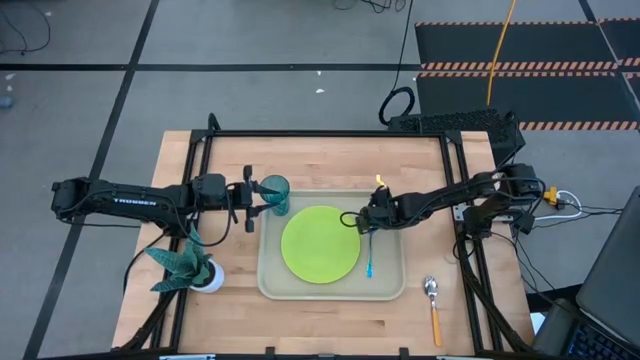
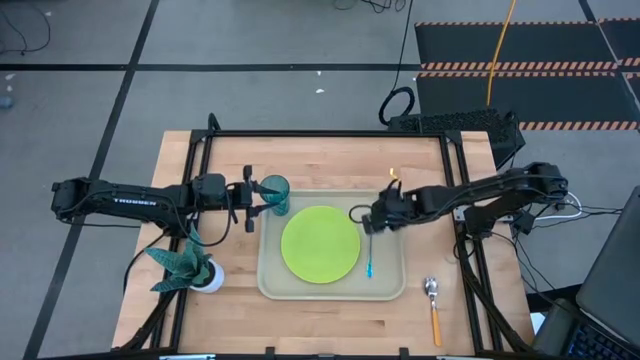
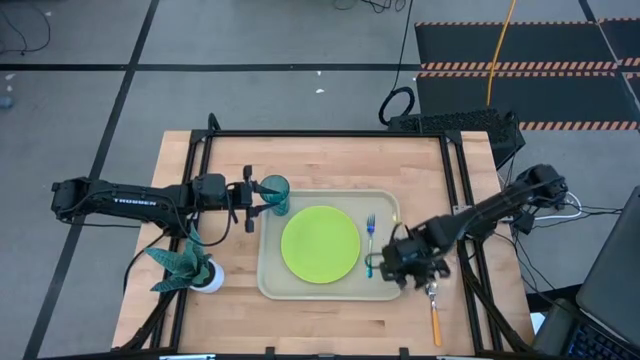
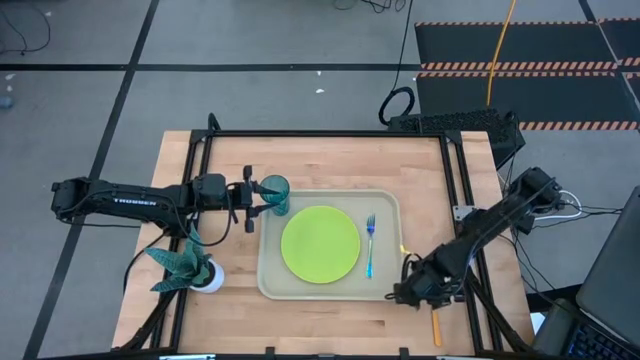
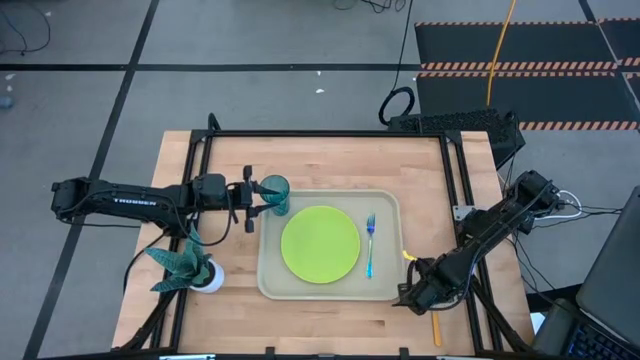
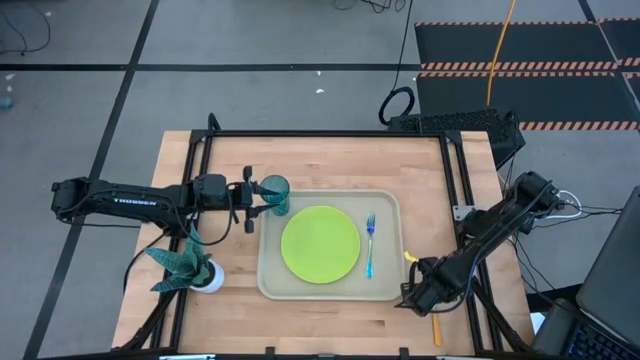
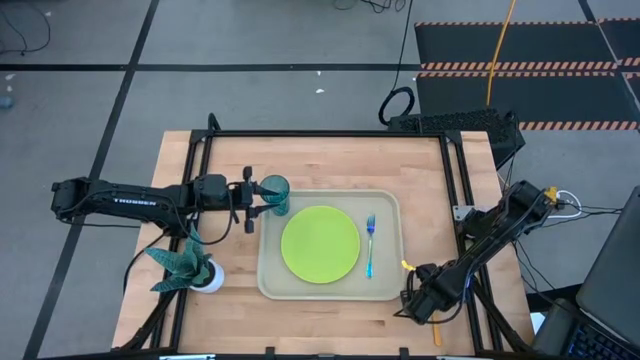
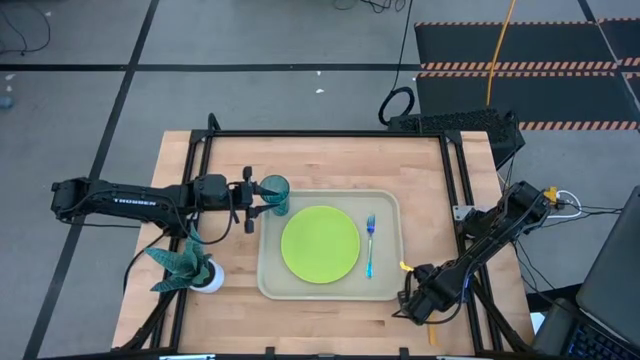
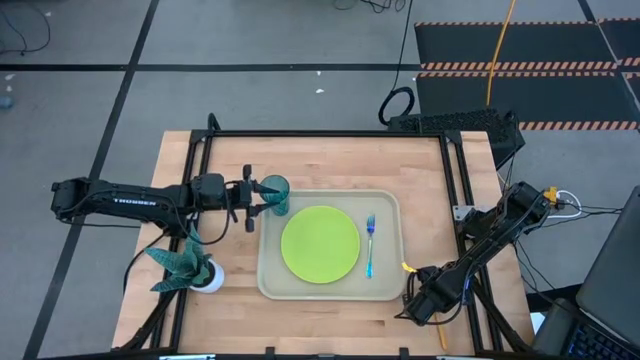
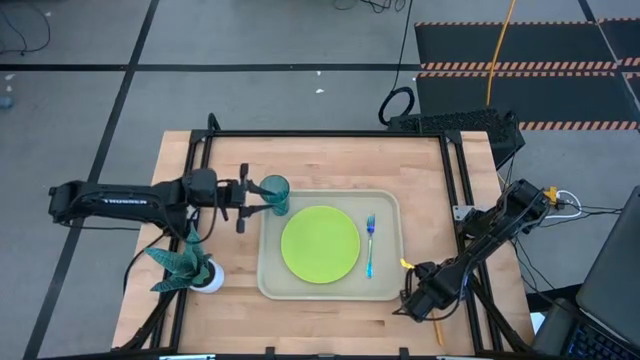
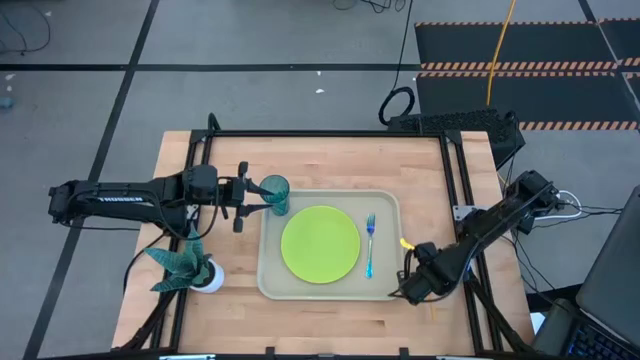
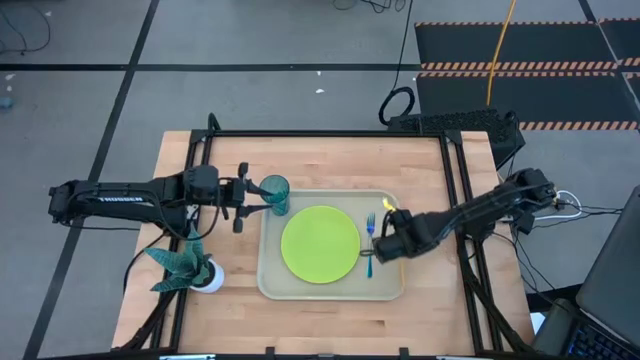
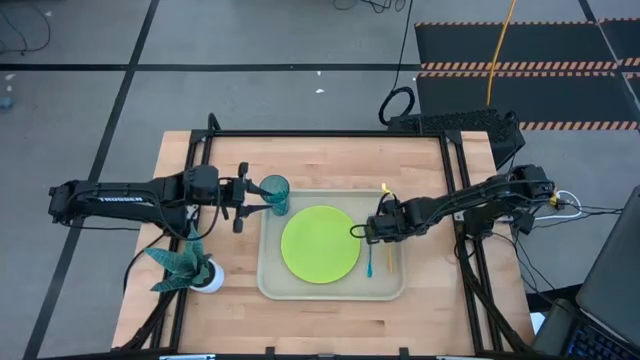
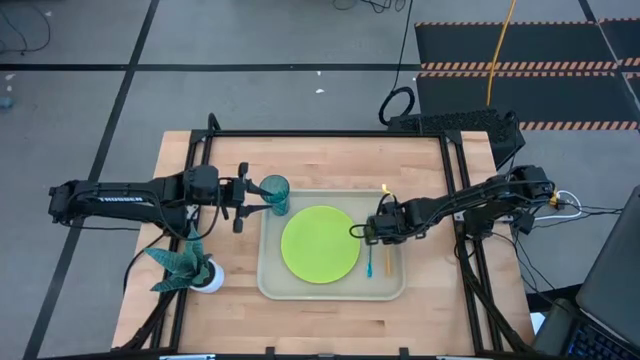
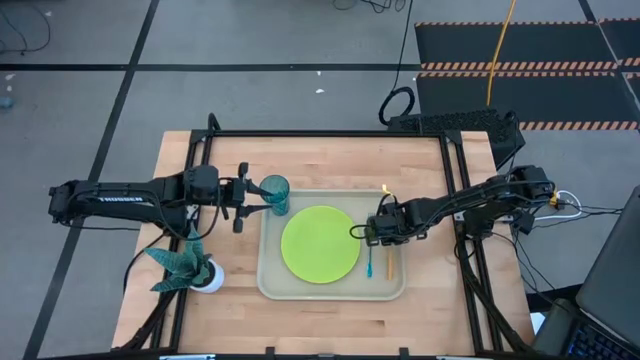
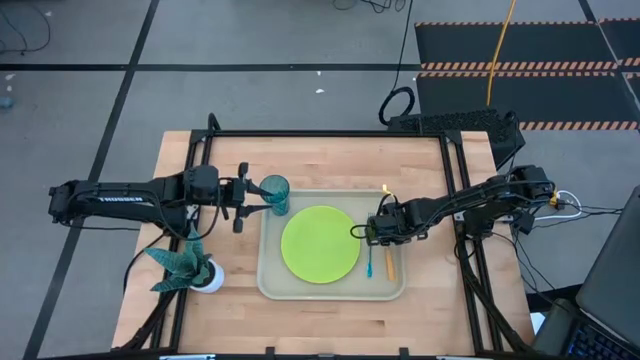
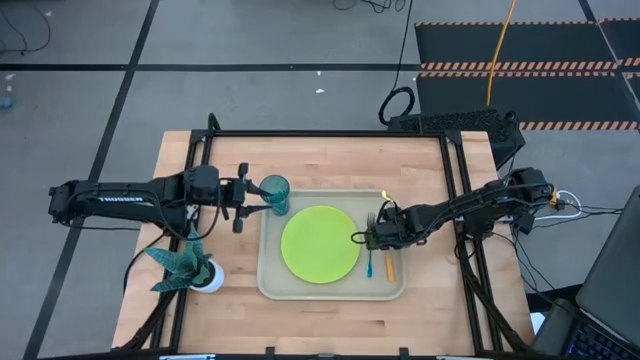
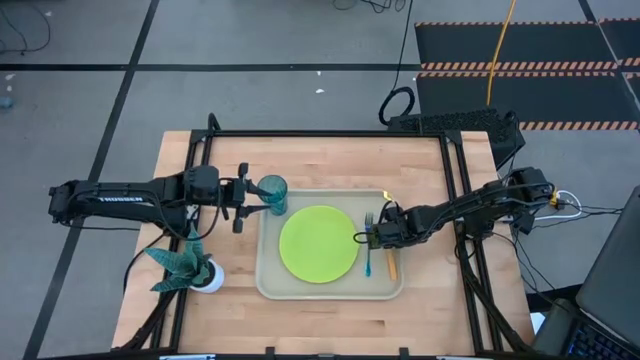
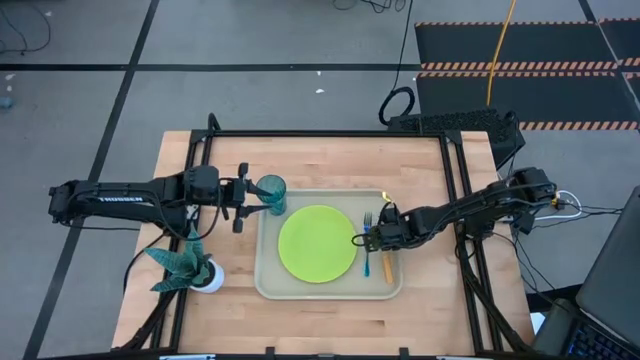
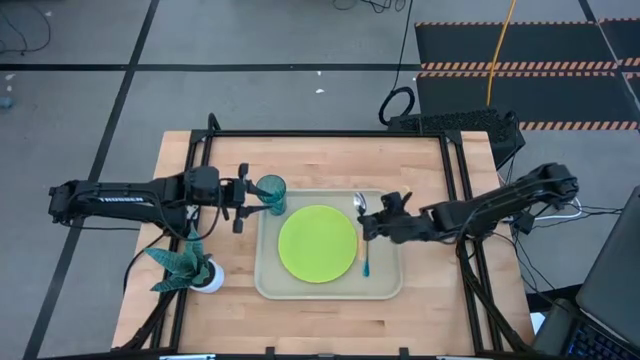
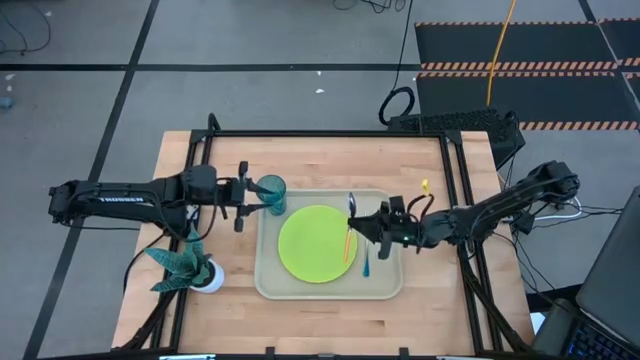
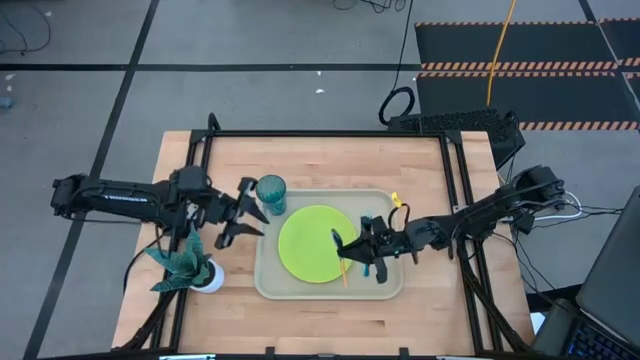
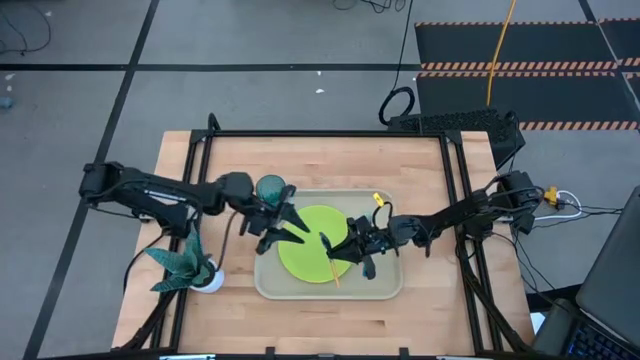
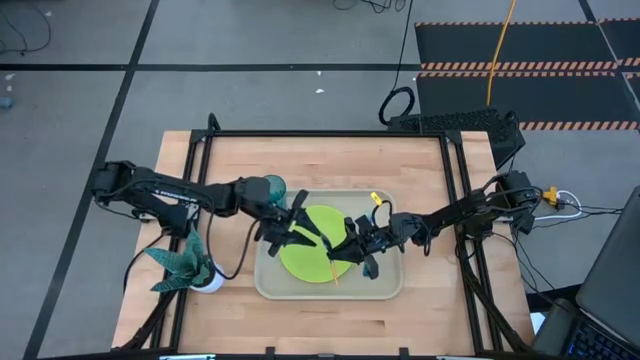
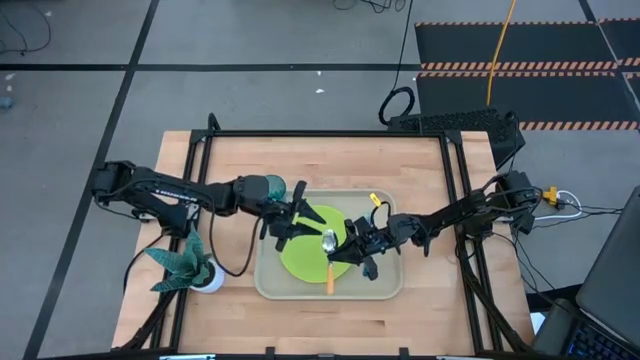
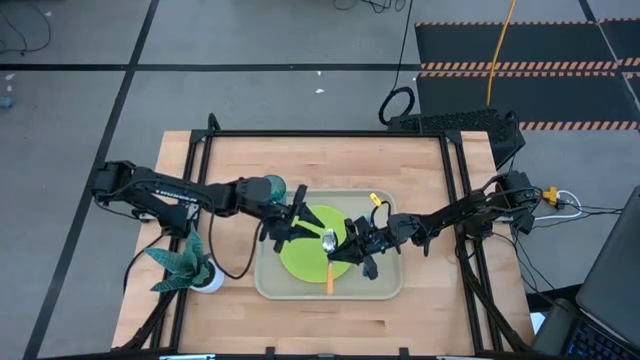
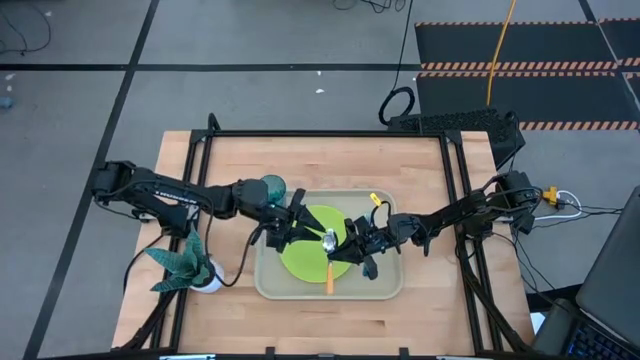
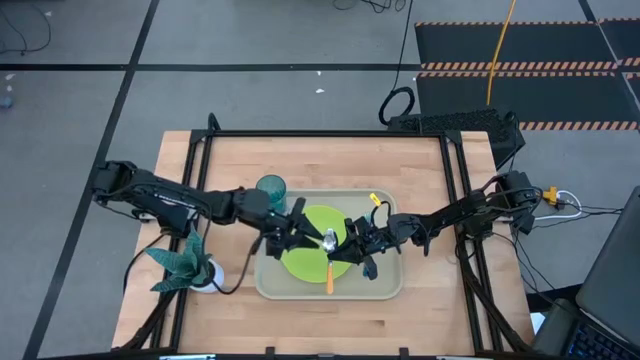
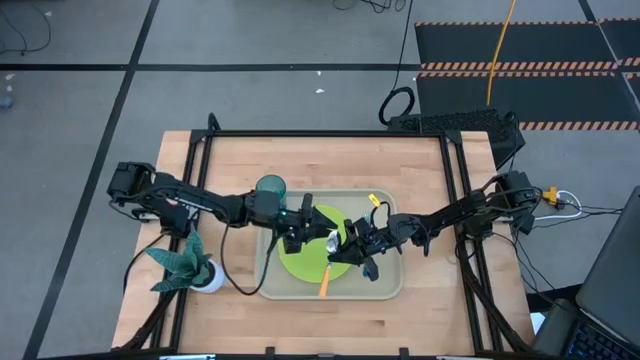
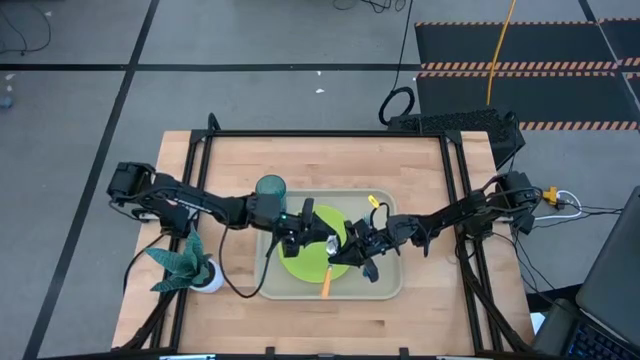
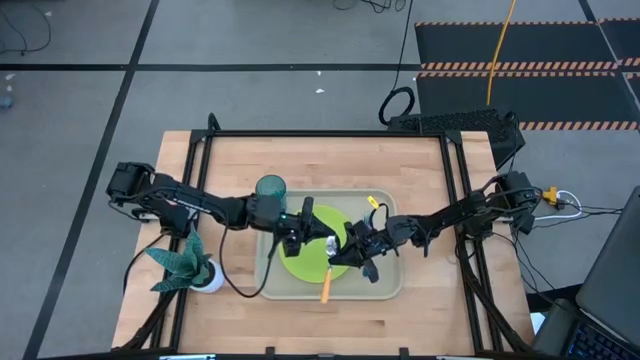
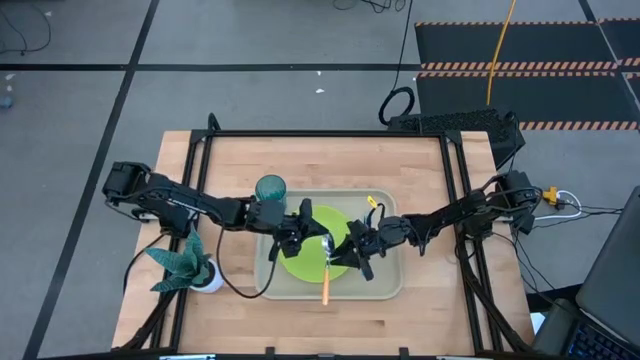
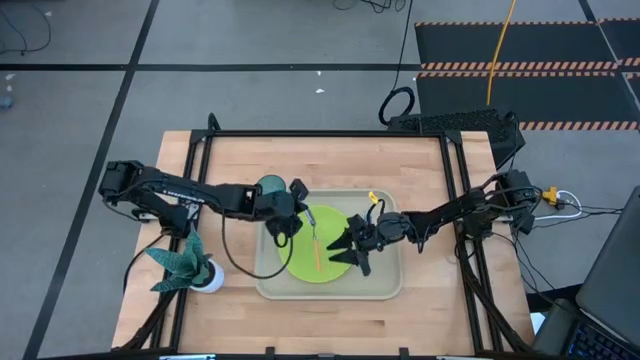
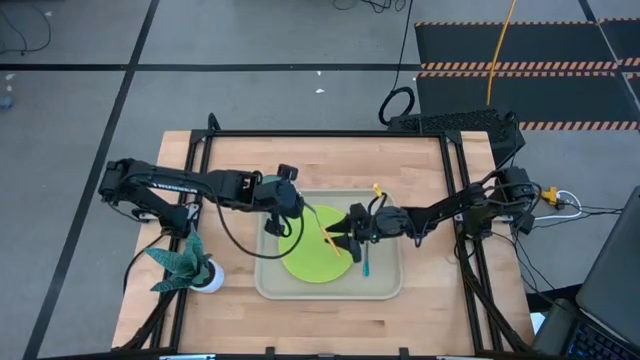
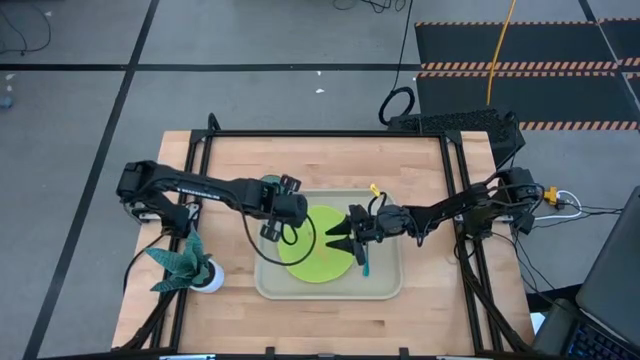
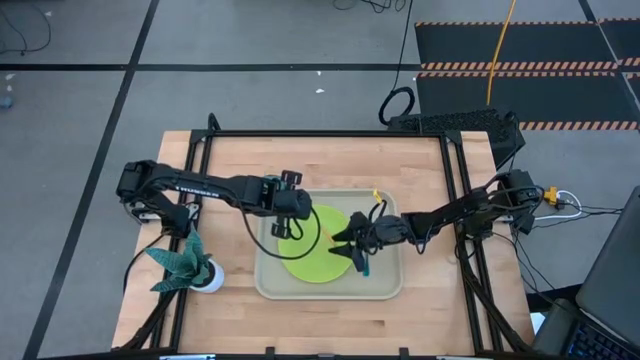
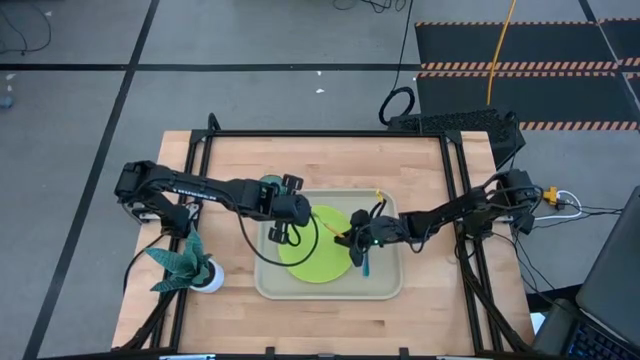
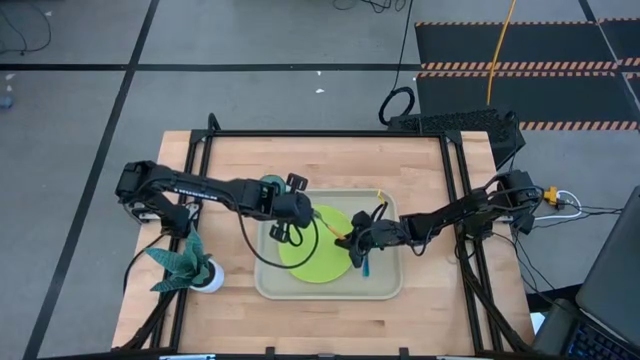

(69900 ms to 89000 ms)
Task: Pick and place plate/cup/fork/spoon on tray
Put the yellow spoon on the gray serving tray

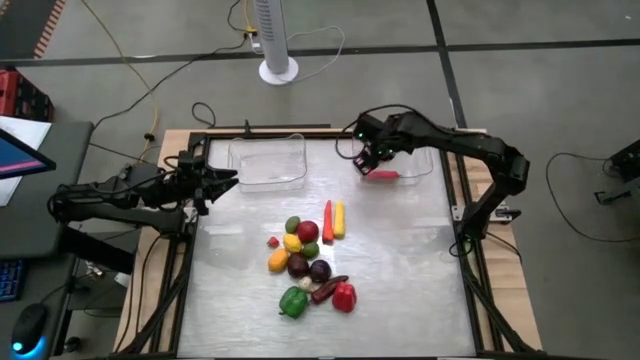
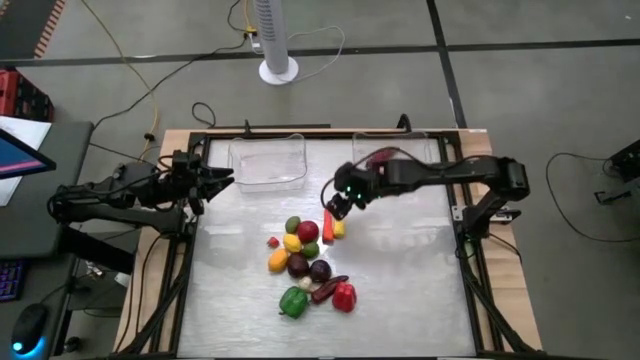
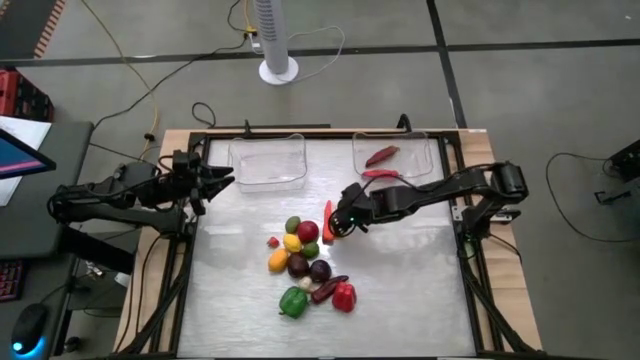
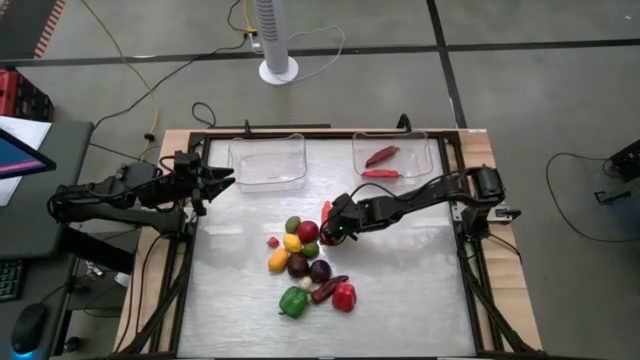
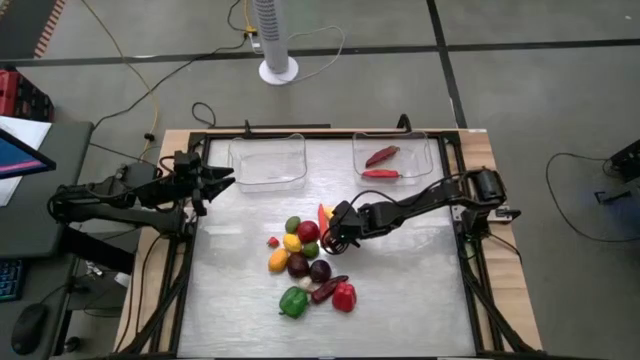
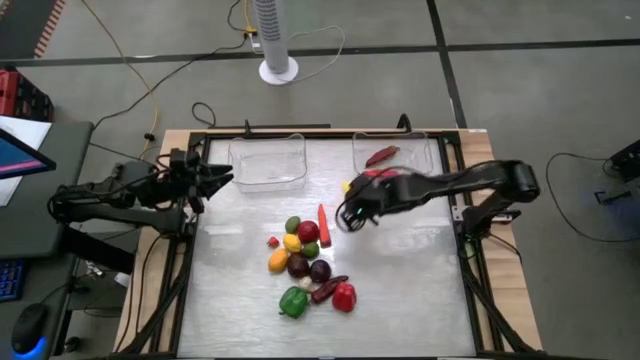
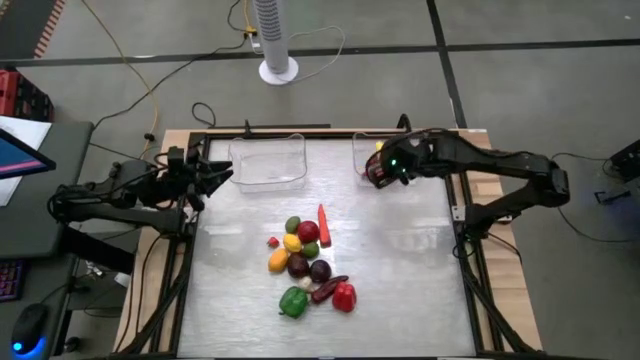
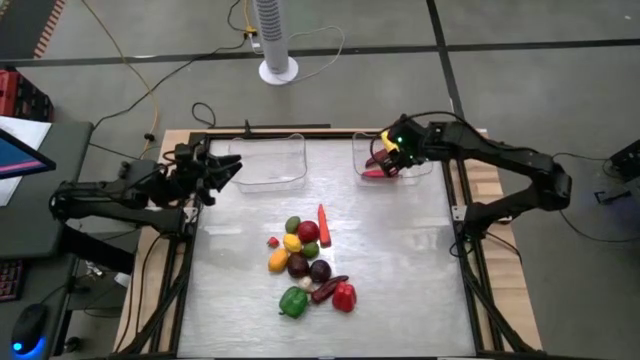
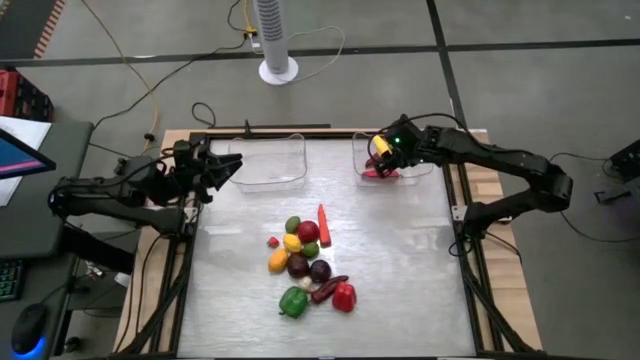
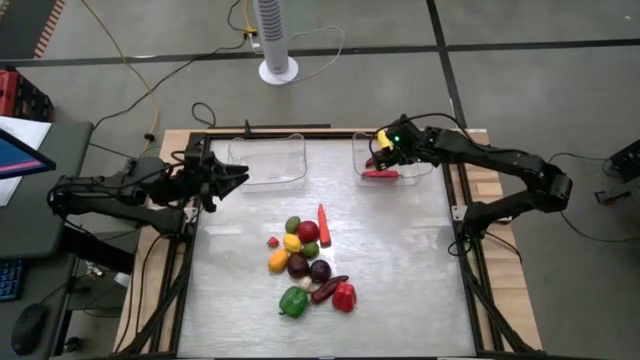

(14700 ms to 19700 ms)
Task: Sort produce into baskets
Put the yellow corn into the right transparent bin
